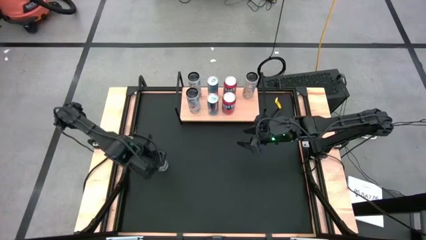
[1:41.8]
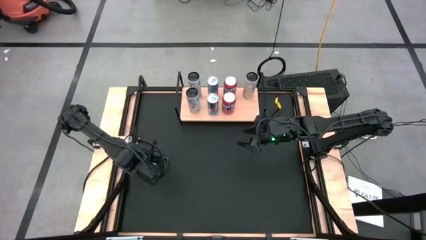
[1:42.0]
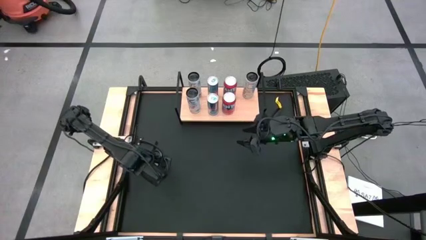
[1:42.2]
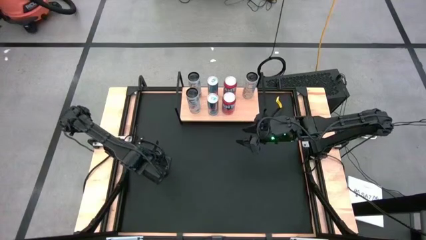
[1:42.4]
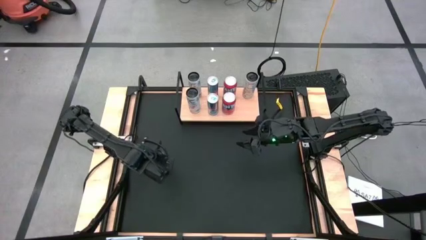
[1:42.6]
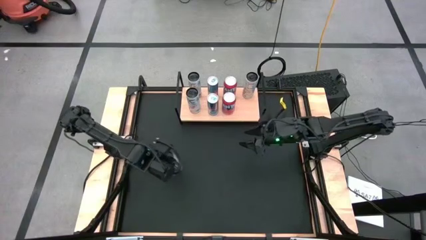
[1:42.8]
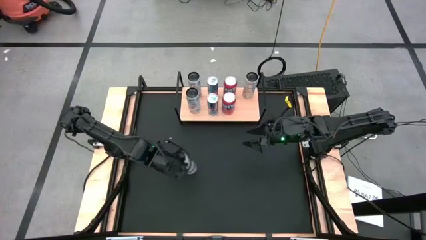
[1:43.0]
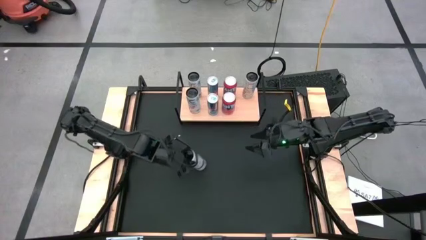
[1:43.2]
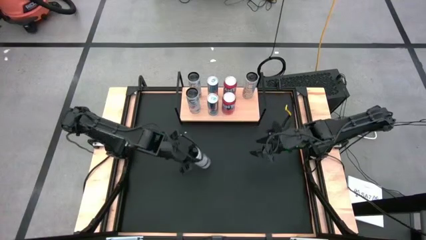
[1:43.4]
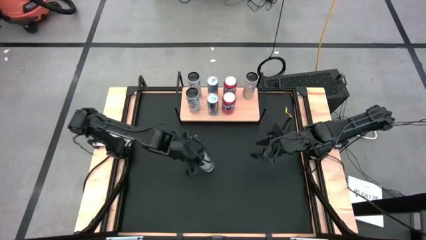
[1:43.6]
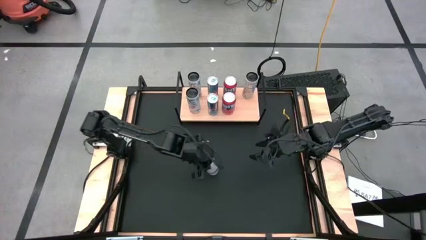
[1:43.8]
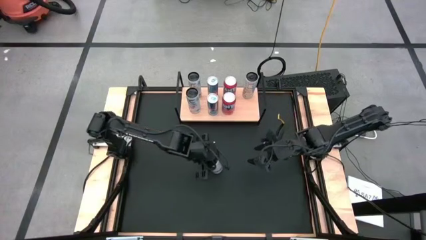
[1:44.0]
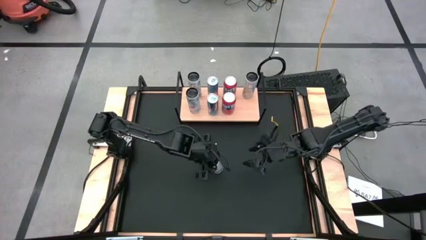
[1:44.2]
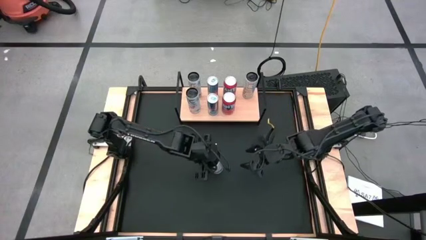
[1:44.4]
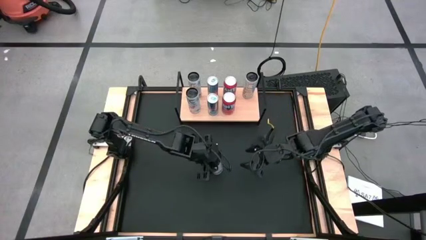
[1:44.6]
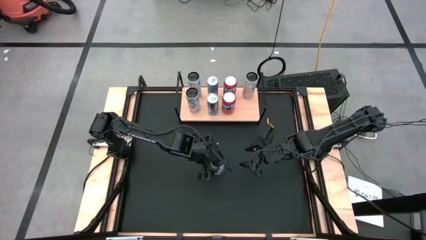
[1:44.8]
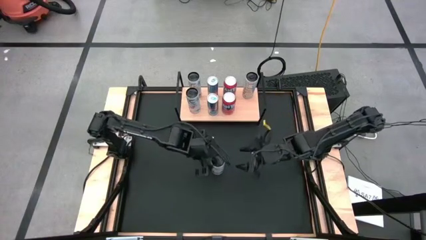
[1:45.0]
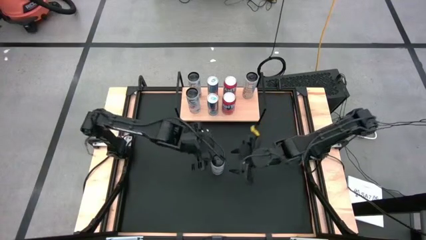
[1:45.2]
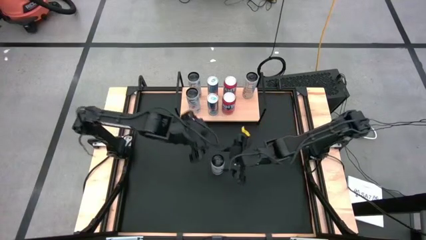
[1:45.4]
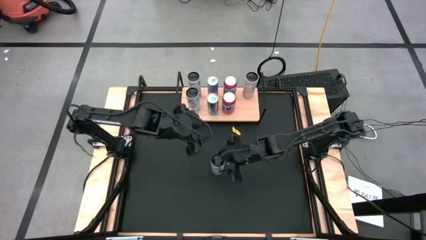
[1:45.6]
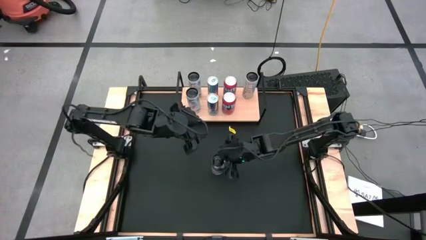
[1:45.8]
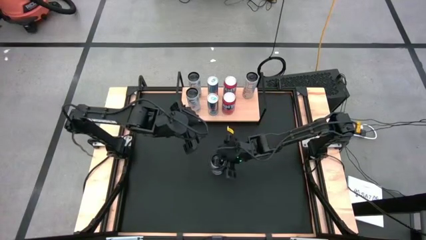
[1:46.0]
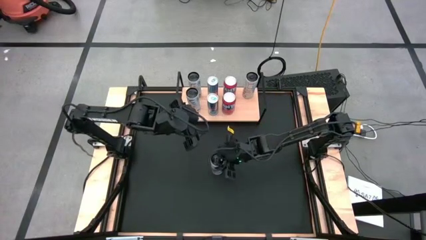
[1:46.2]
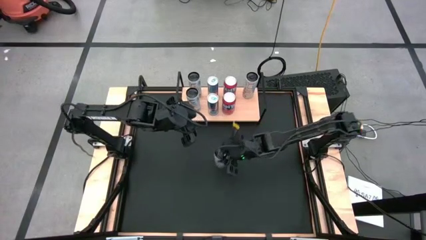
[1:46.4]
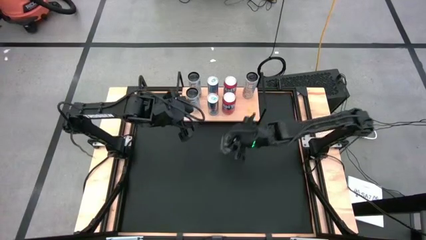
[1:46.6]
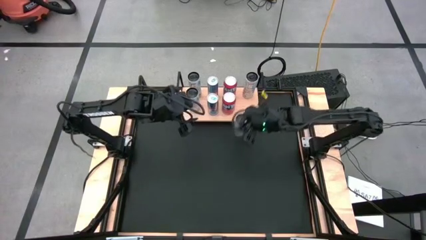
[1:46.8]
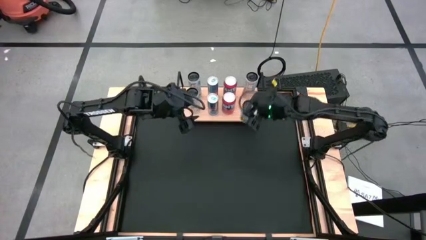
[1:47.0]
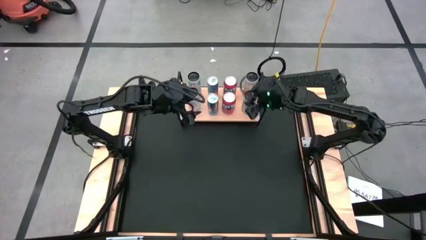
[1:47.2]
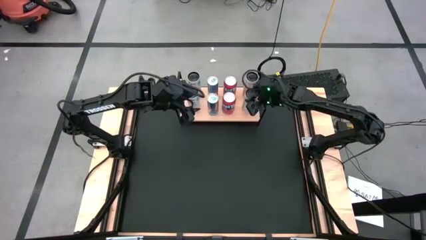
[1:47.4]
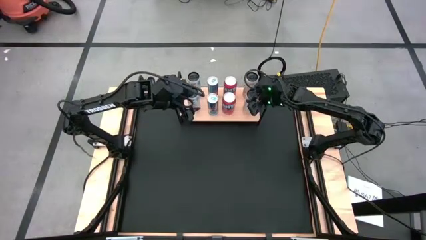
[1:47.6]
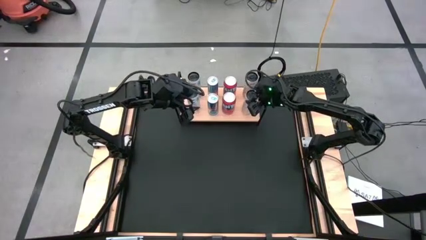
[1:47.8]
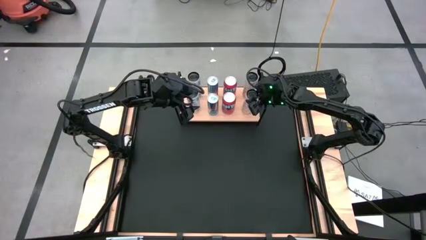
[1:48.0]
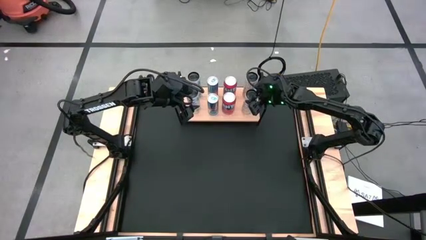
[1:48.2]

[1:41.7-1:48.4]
Task: Place canned beverage on shelf
Put the white-yellow soda can on the shelf aligned with the other white-yellow soda can

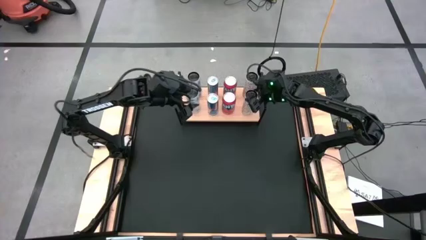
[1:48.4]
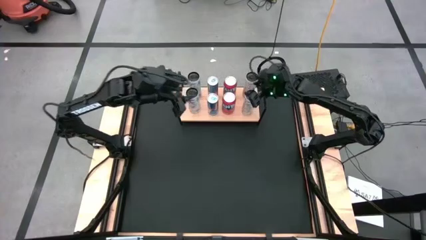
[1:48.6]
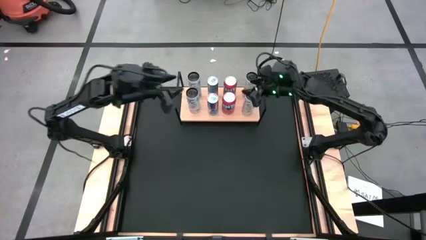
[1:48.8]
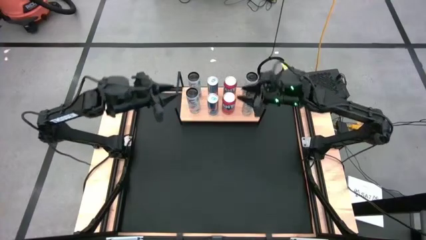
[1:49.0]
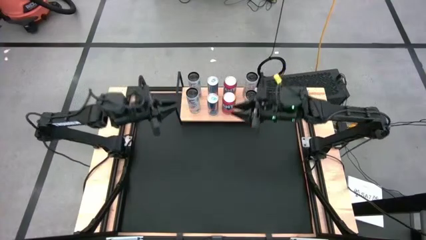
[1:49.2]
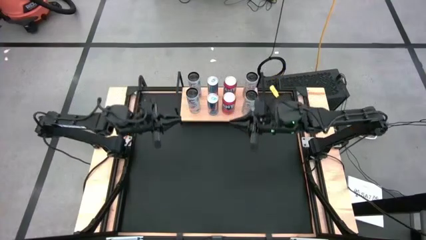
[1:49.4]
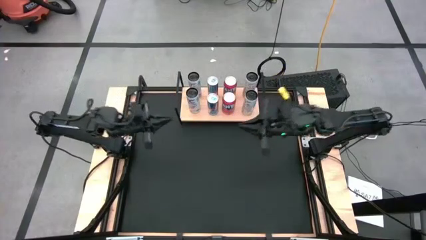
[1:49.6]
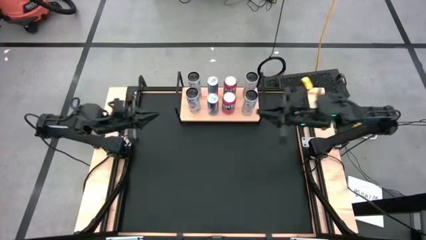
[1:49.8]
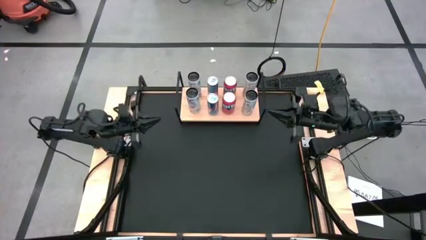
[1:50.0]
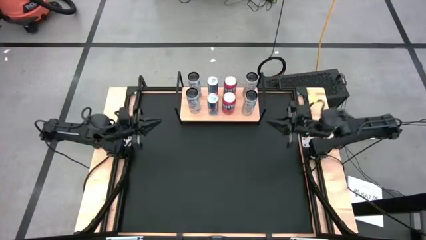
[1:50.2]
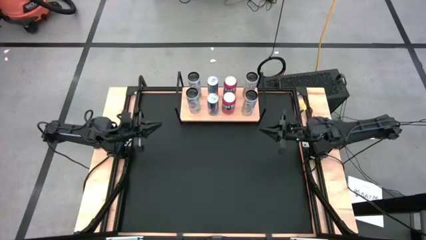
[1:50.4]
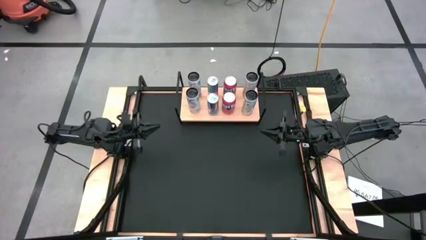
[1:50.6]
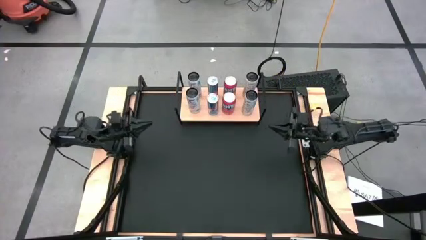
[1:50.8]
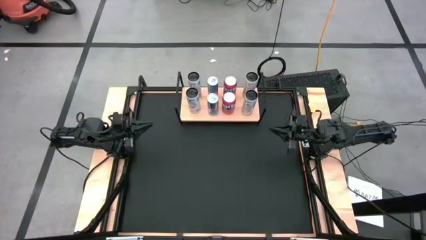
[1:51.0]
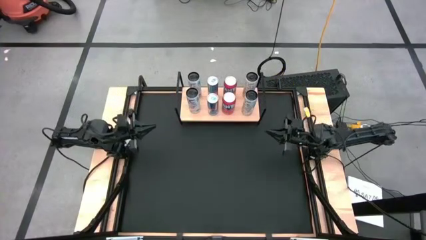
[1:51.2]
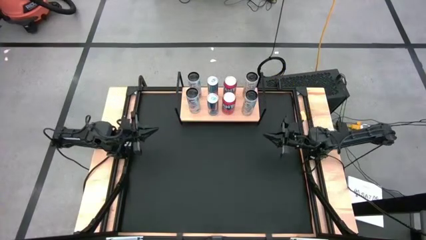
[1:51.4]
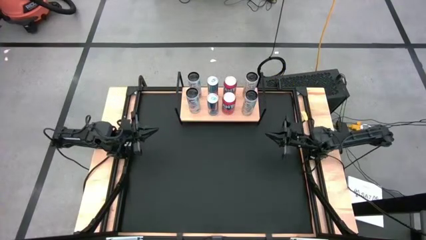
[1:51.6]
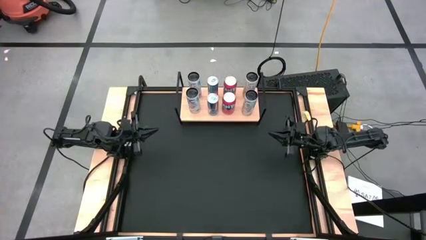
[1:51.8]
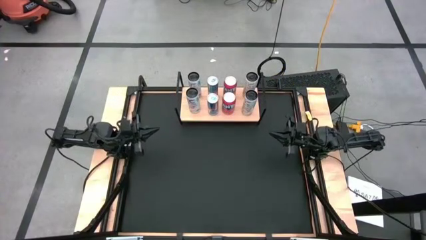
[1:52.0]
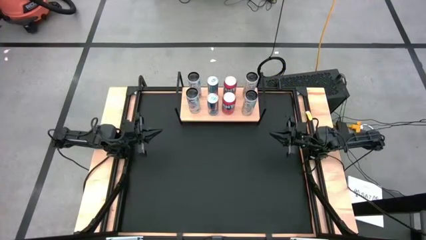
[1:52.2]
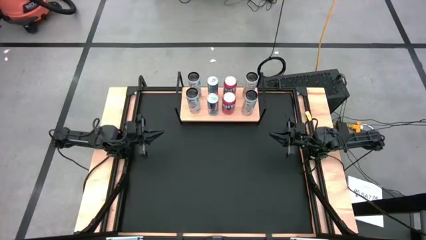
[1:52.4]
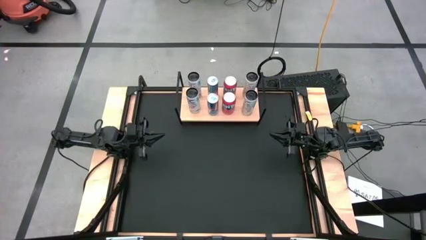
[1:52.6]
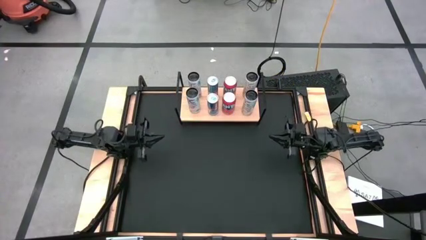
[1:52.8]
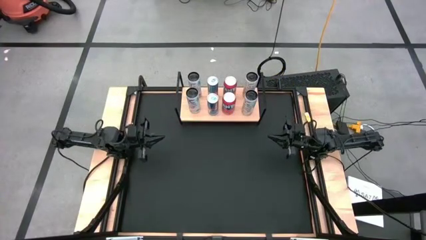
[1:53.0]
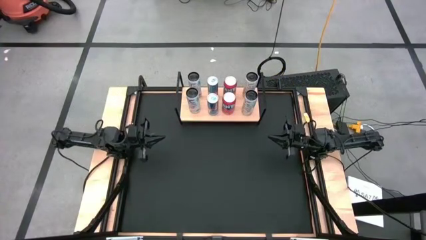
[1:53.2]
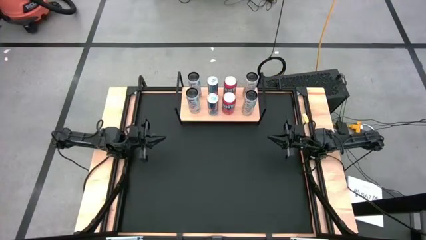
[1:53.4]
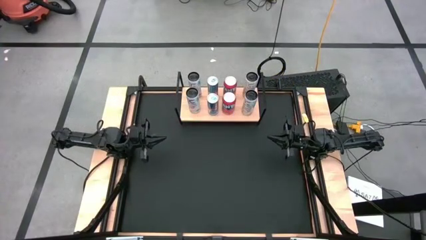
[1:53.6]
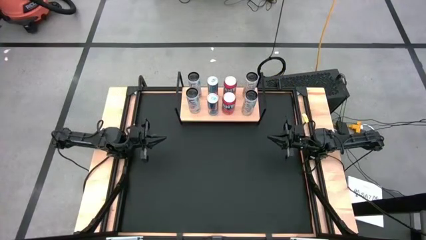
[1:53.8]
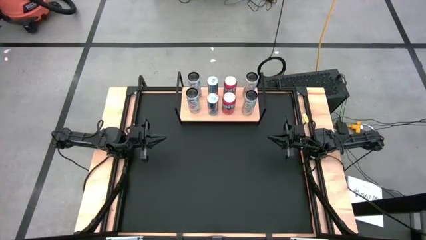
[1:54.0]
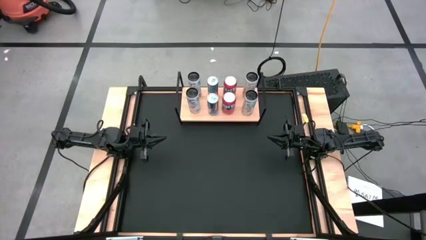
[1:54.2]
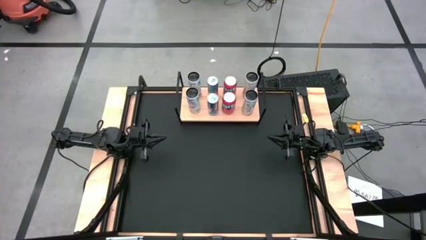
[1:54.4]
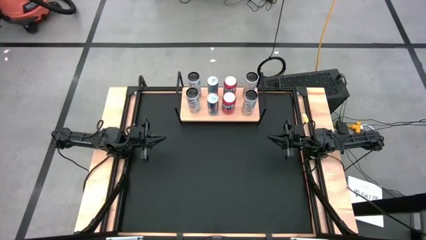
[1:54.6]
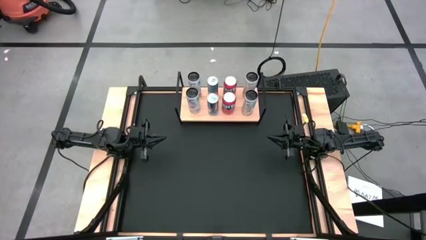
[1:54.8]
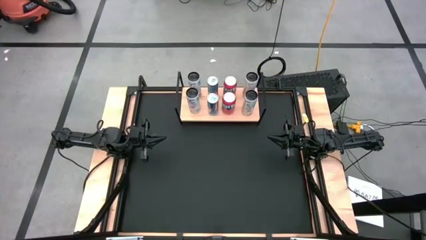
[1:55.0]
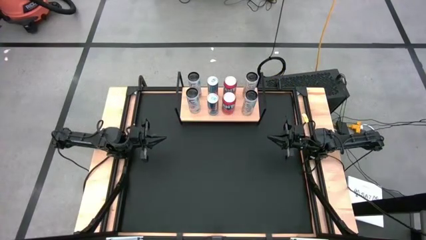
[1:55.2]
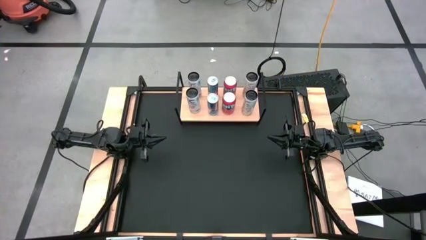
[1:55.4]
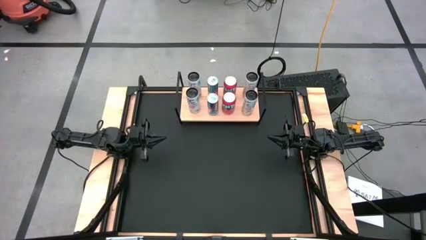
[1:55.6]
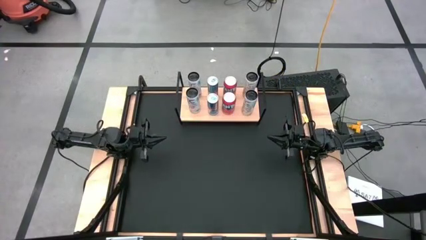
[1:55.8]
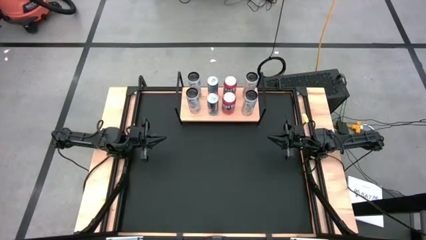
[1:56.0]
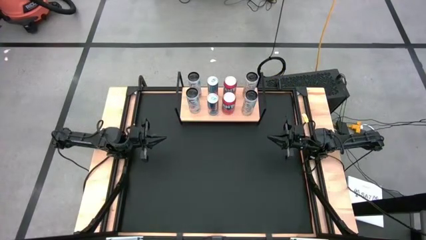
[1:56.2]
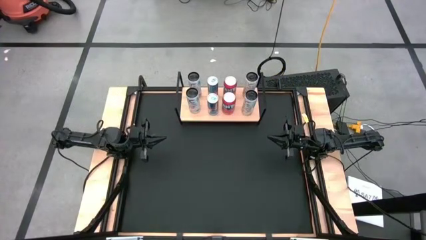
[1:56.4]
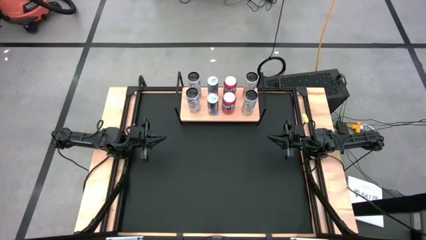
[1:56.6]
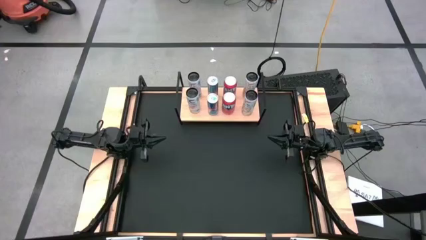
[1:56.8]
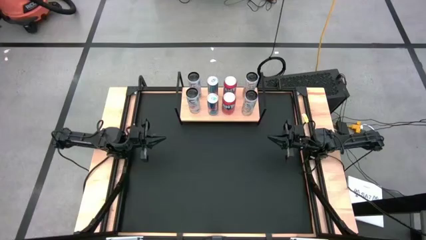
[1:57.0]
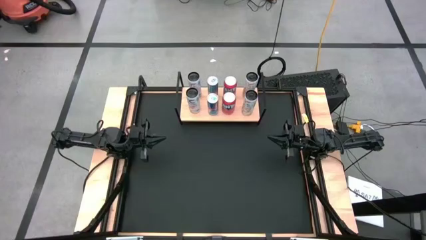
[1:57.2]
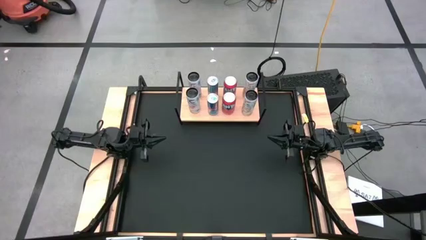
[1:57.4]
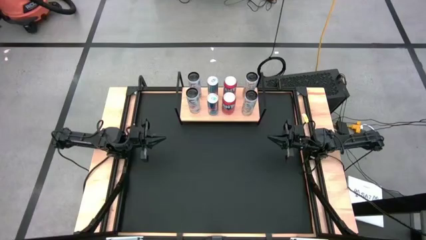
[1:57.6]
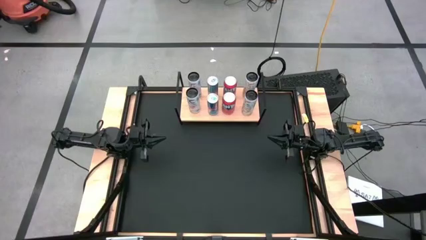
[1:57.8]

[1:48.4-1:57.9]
Return to Home Position
